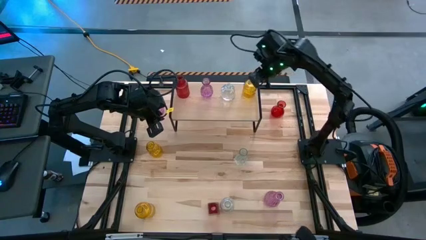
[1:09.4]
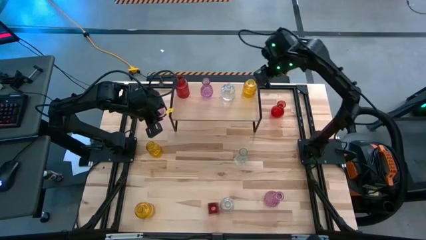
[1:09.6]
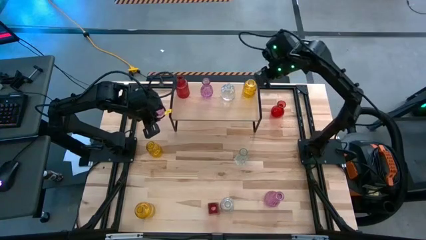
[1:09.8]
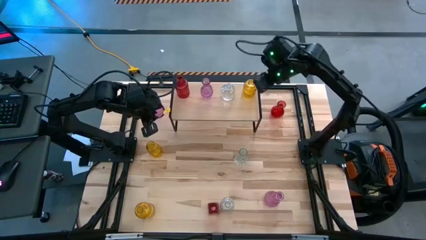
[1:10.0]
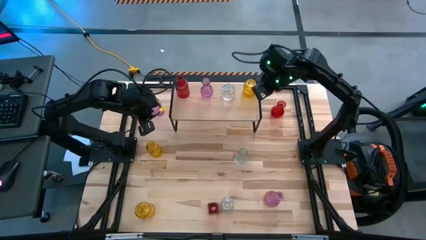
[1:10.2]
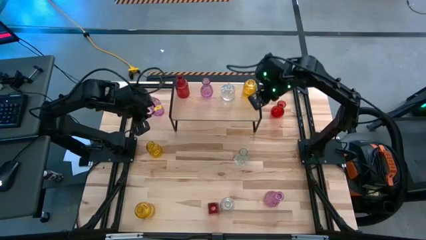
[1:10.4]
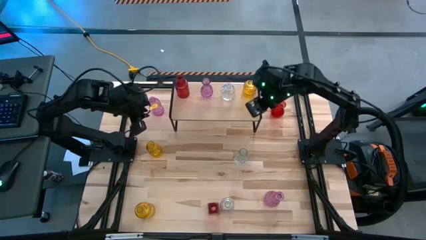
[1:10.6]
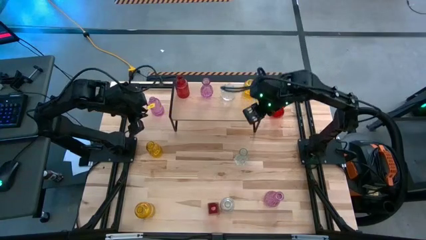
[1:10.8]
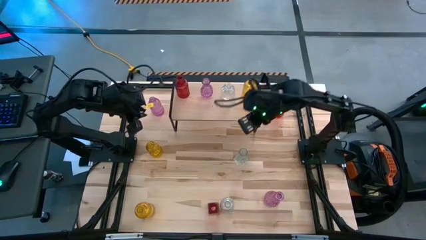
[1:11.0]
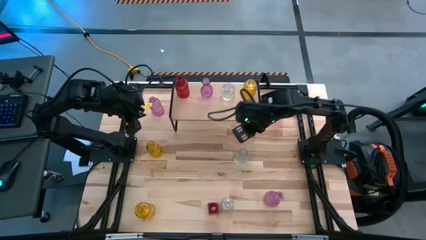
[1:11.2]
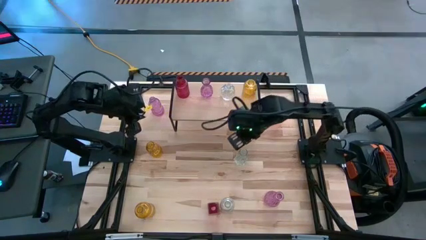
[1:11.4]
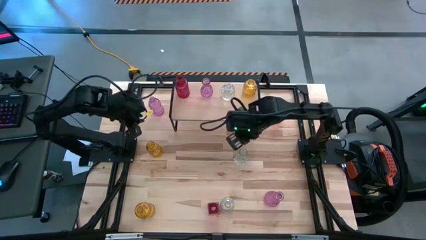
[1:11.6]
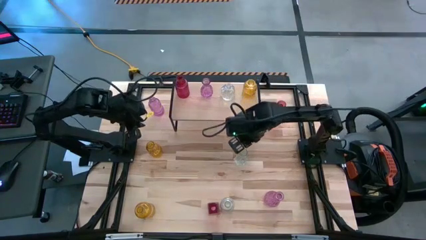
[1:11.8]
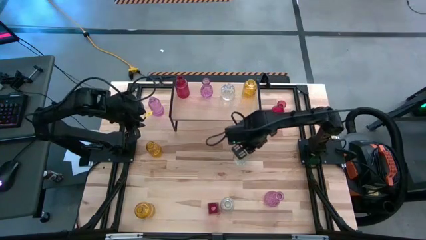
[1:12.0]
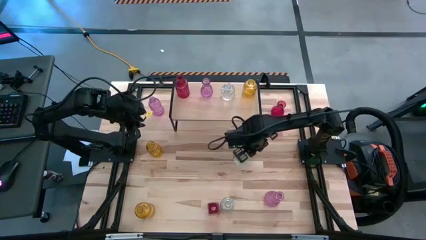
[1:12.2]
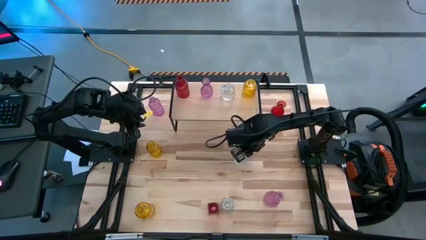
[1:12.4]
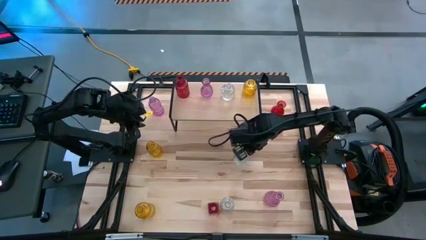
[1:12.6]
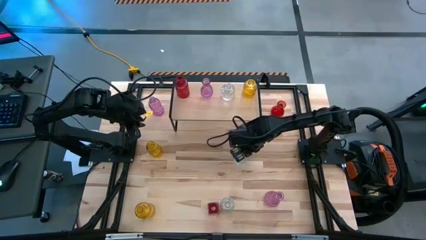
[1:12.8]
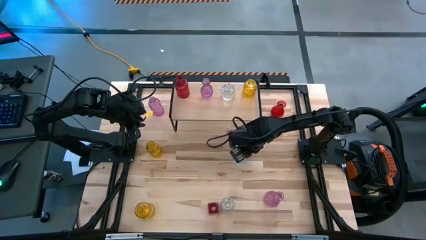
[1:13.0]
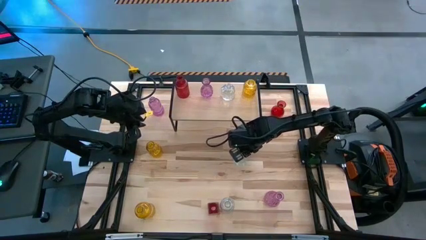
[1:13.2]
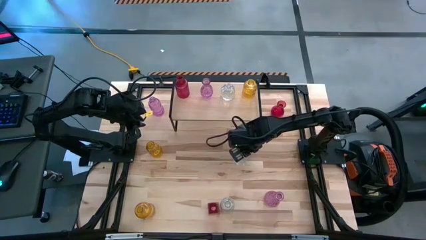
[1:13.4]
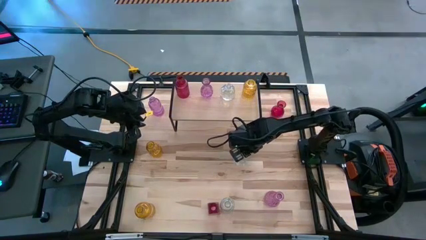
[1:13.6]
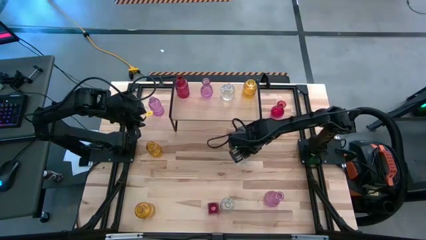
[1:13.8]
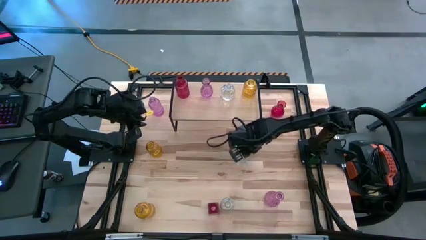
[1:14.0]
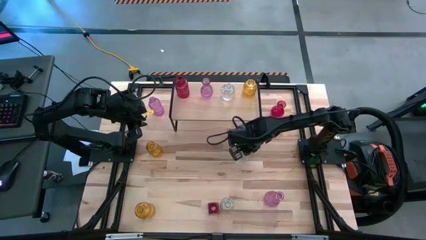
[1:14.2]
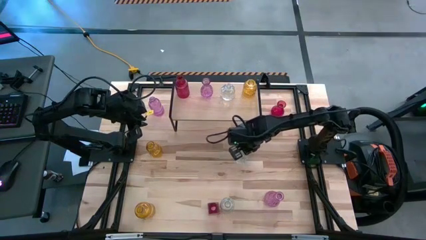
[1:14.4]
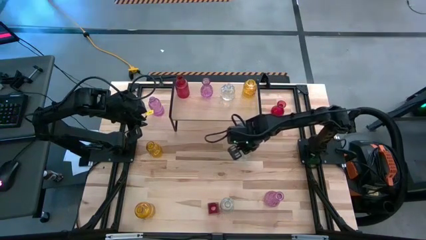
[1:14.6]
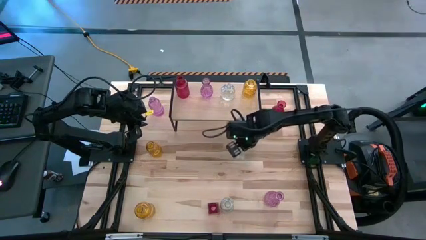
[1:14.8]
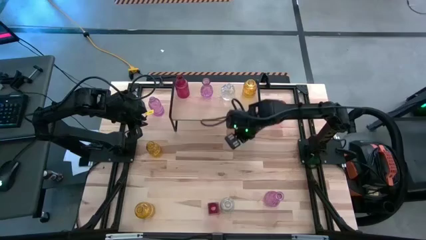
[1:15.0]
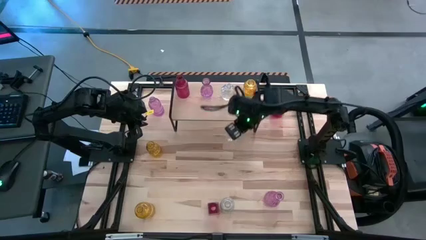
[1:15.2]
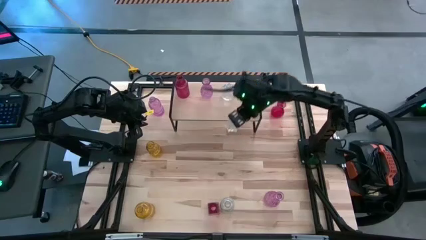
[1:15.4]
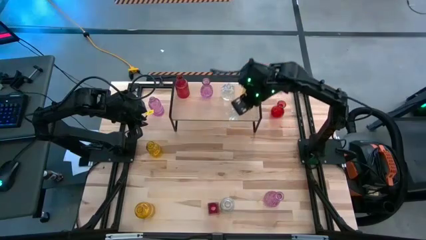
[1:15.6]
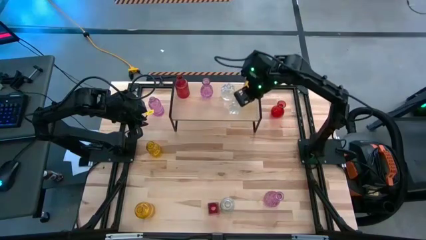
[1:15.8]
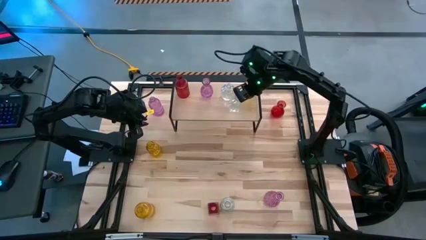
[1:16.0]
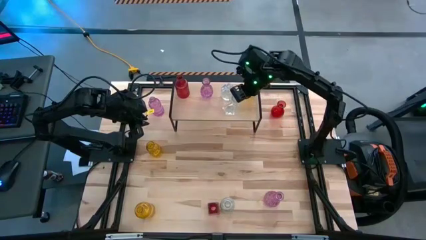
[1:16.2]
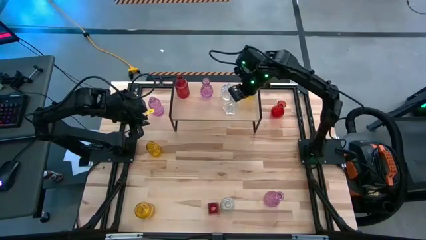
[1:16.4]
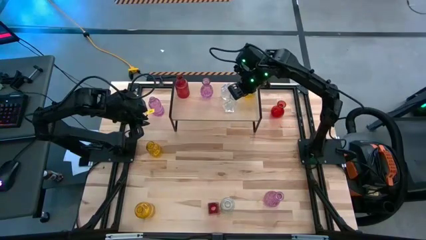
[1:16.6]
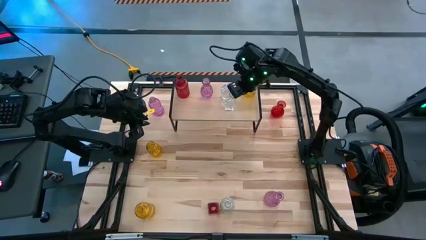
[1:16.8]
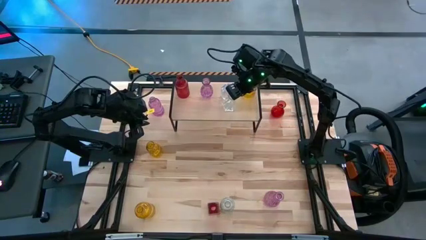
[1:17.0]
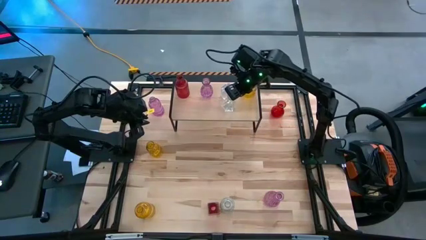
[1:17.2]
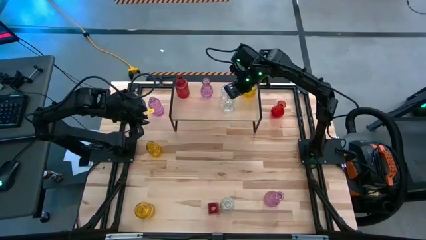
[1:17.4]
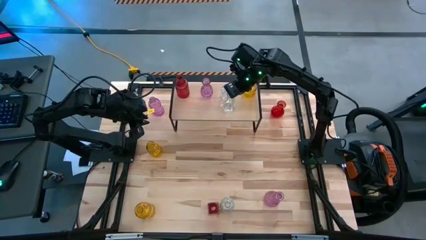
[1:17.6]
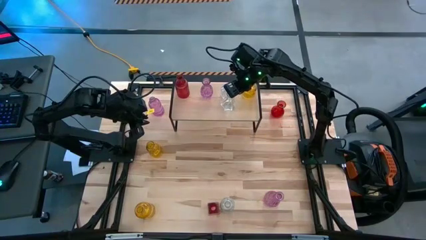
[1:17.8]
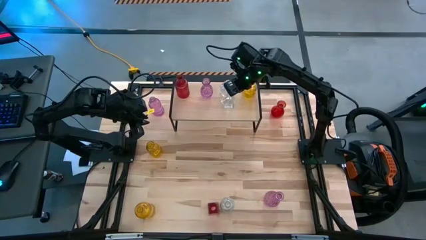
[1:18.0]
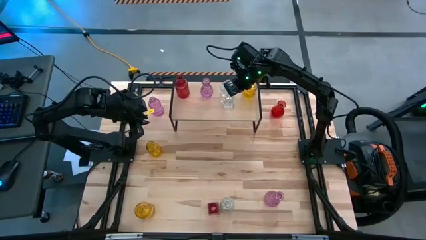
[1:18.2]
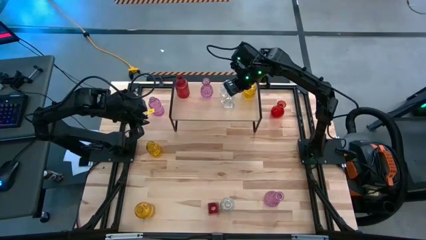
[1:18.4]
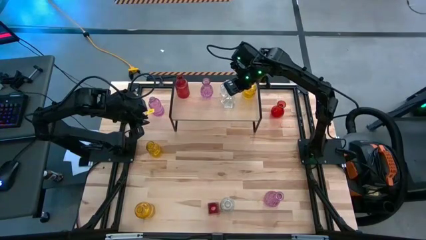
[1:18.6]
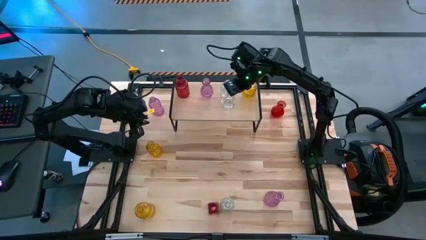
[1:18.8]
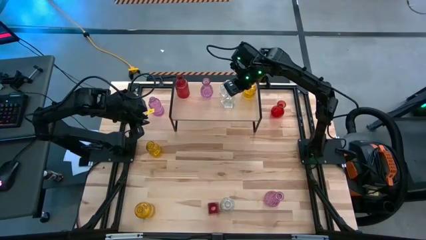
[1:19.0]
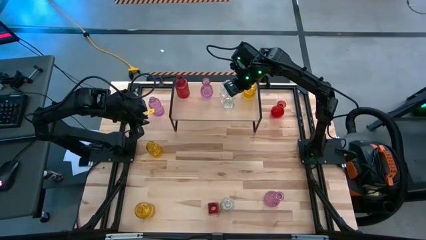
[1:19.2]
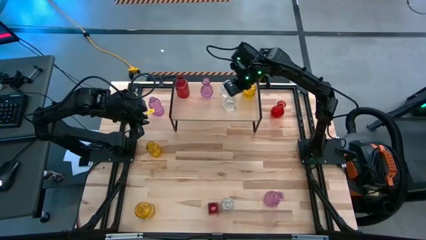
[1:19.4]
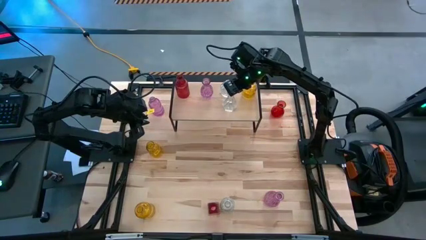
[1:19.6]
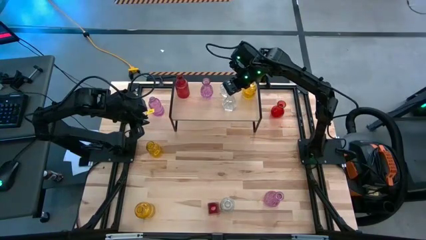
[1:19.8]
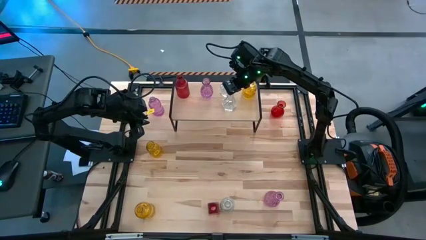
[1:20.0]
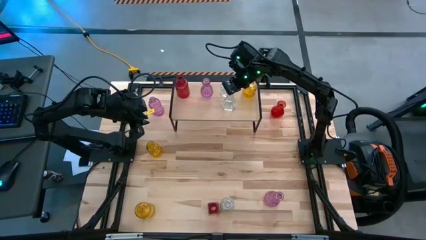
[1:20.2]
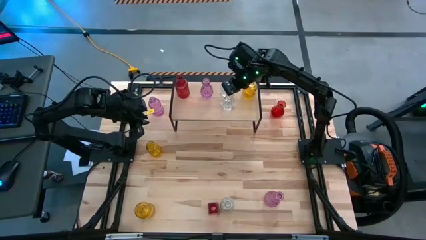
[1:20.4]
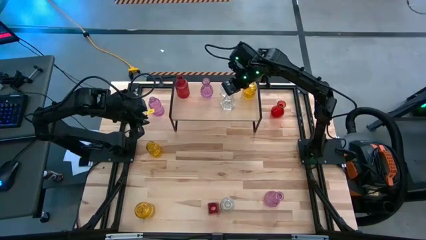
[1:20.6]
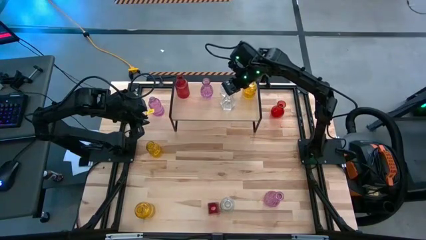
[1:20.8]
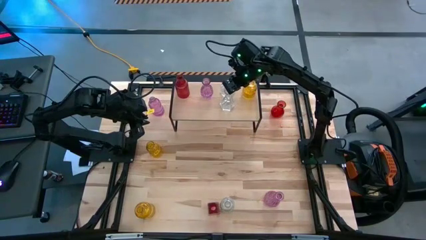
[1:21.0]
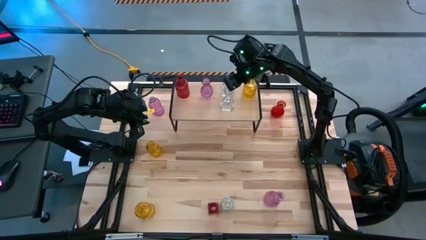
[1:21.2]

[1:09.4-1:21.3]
Task: sort vases onto shelf
Put the top transparent vase on the shelf aligned with the other transparent vase
